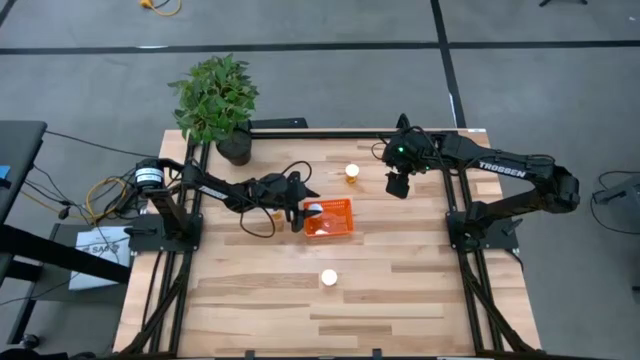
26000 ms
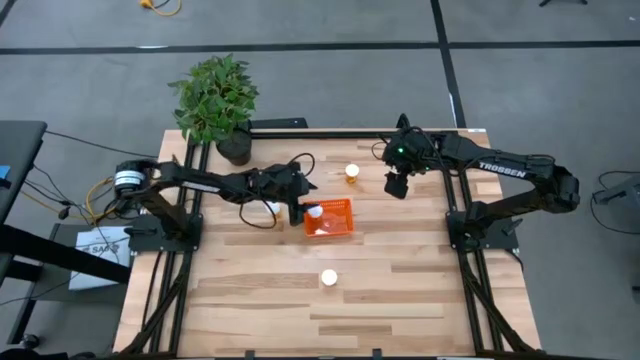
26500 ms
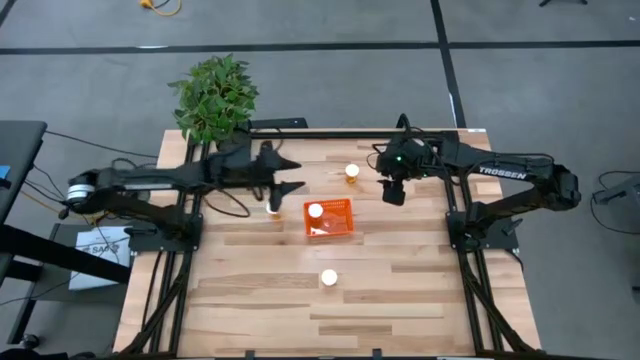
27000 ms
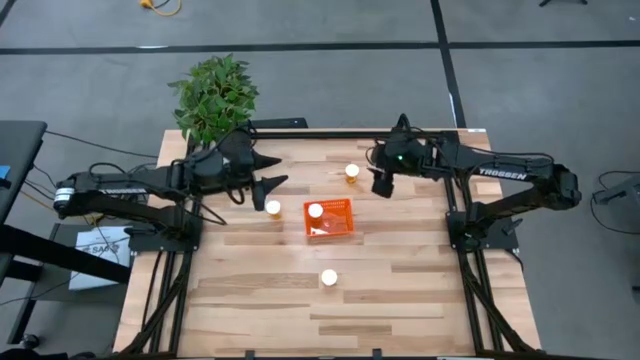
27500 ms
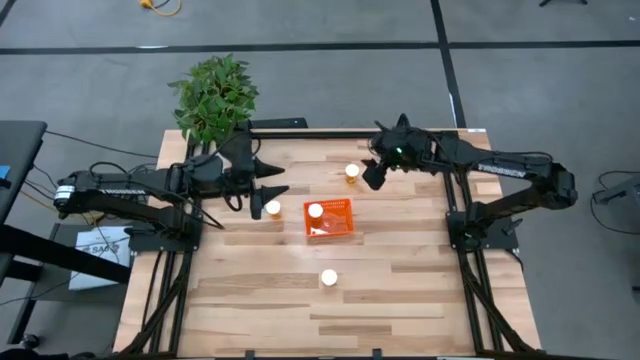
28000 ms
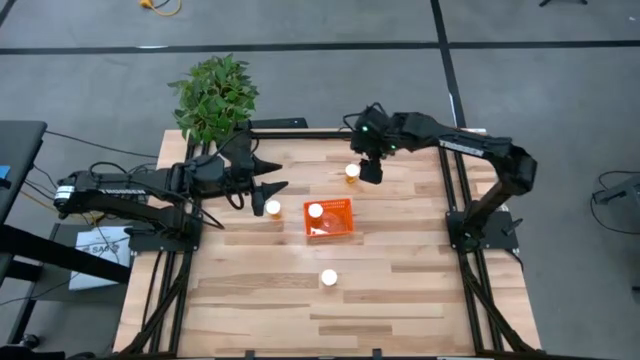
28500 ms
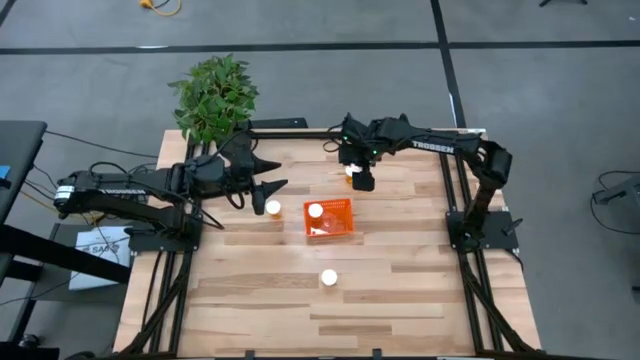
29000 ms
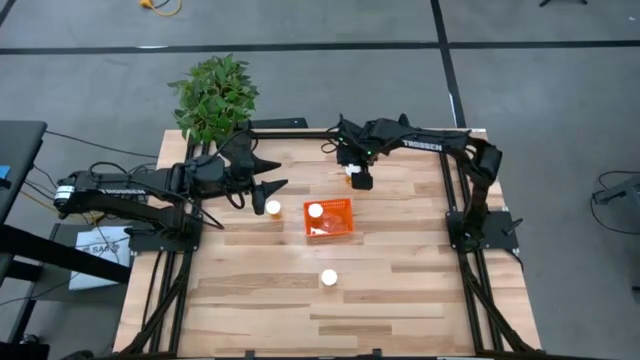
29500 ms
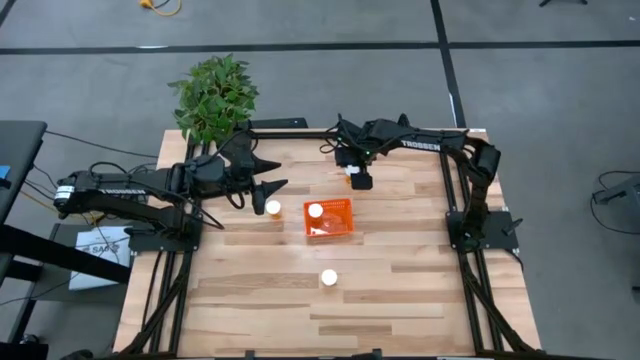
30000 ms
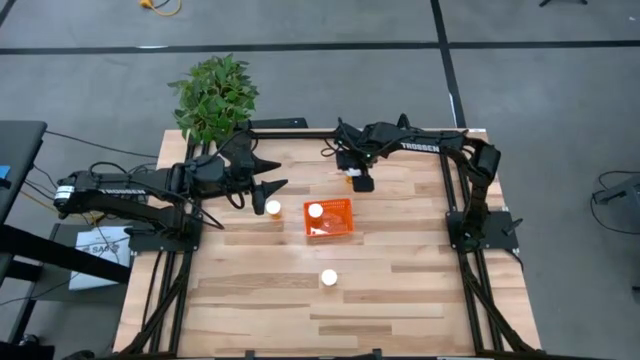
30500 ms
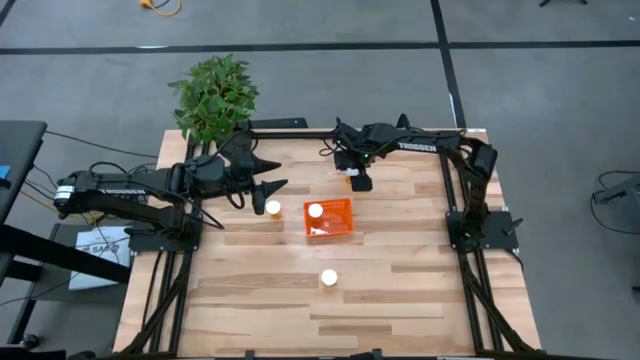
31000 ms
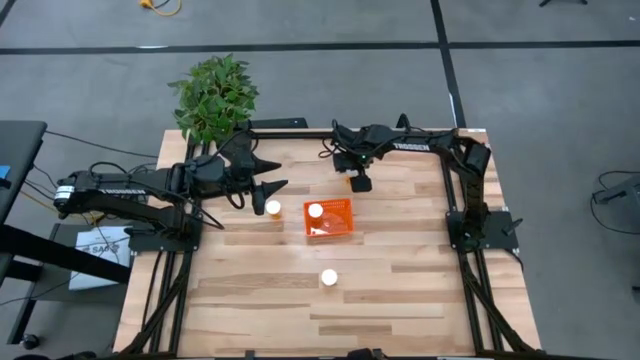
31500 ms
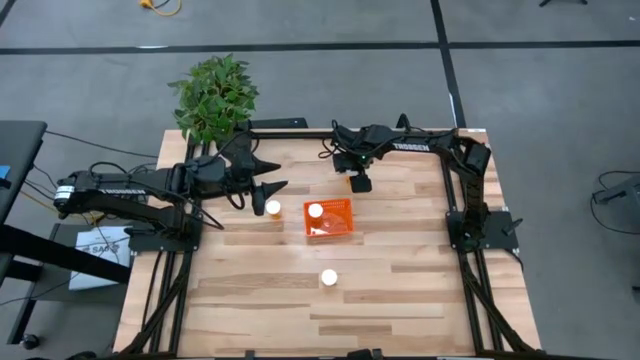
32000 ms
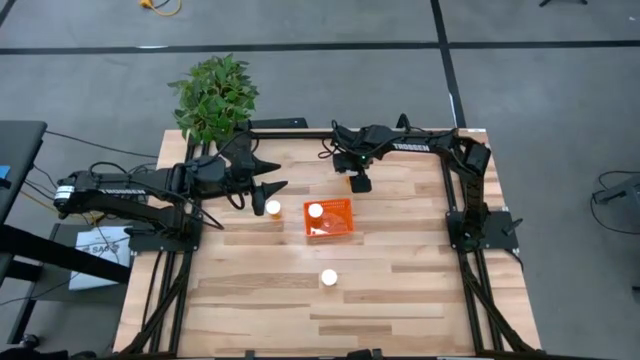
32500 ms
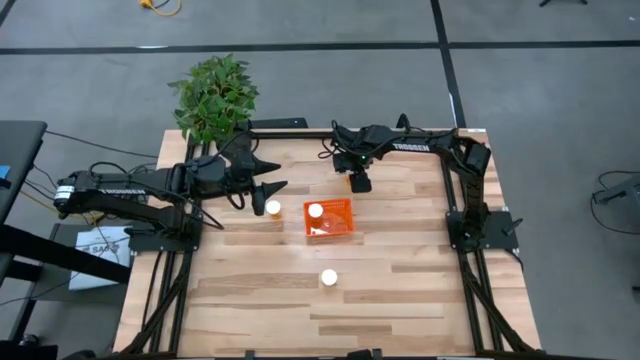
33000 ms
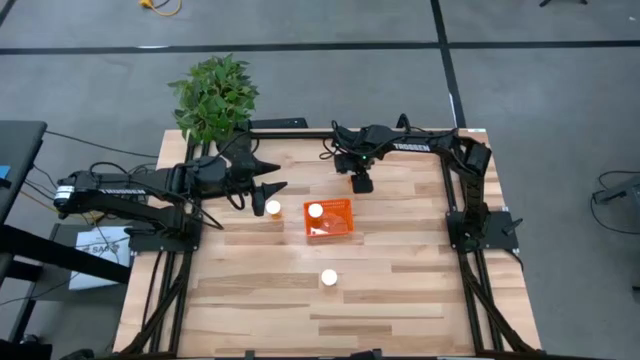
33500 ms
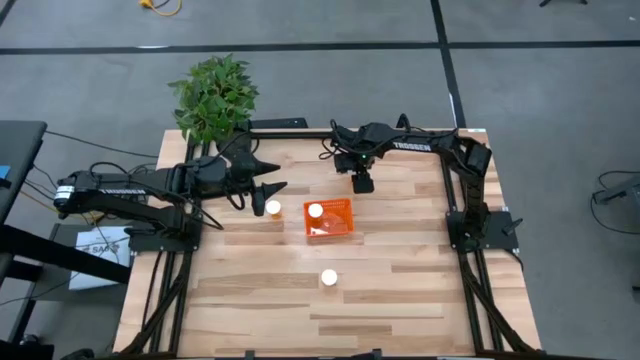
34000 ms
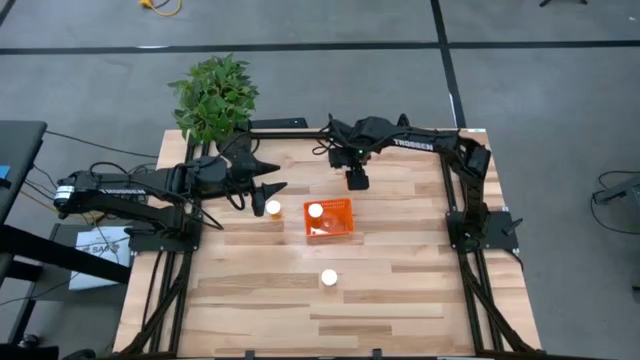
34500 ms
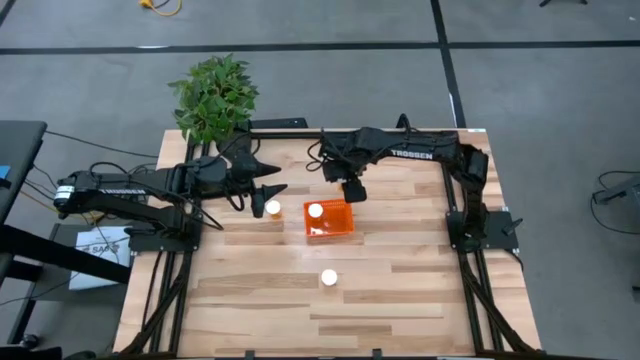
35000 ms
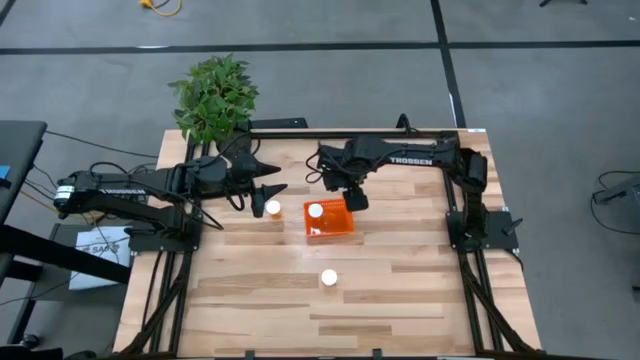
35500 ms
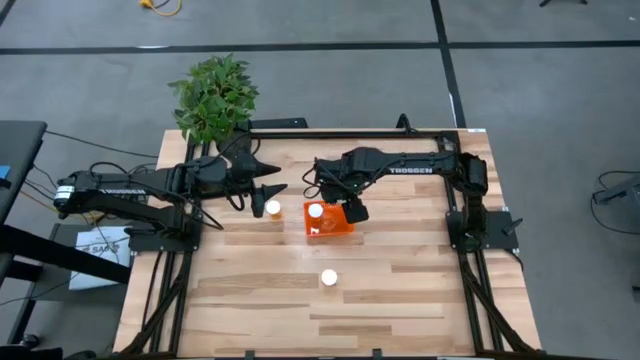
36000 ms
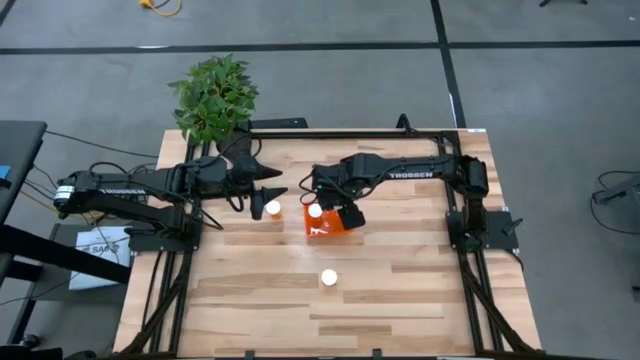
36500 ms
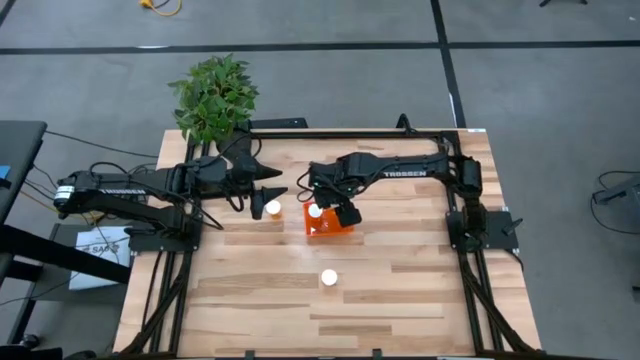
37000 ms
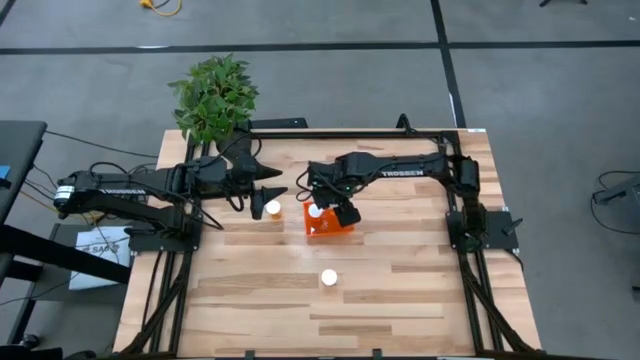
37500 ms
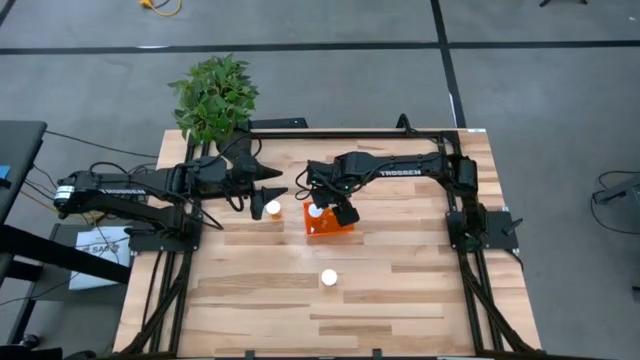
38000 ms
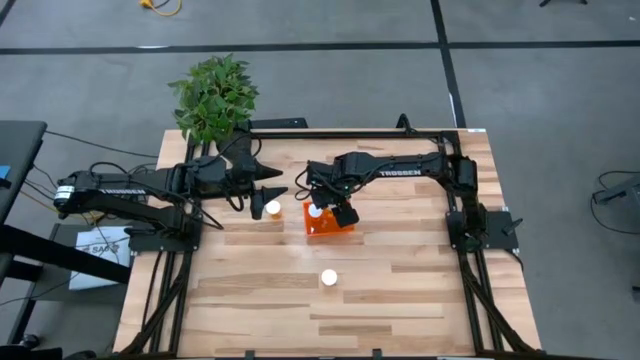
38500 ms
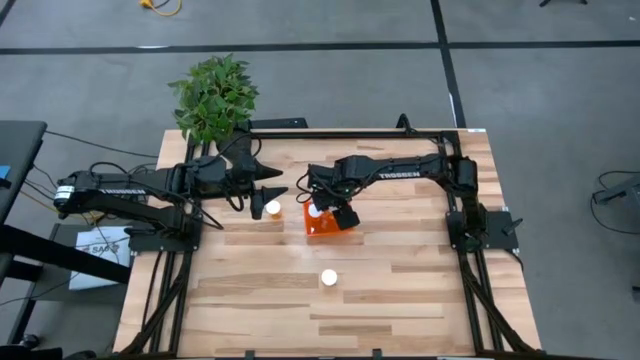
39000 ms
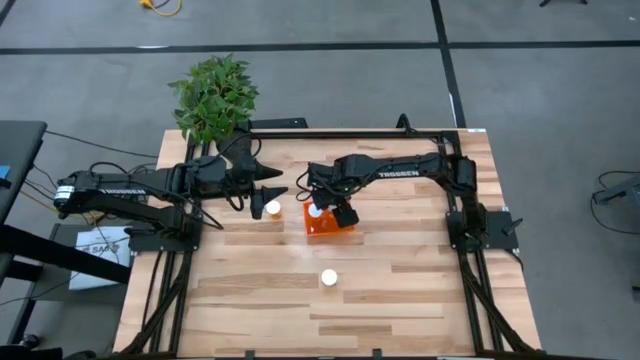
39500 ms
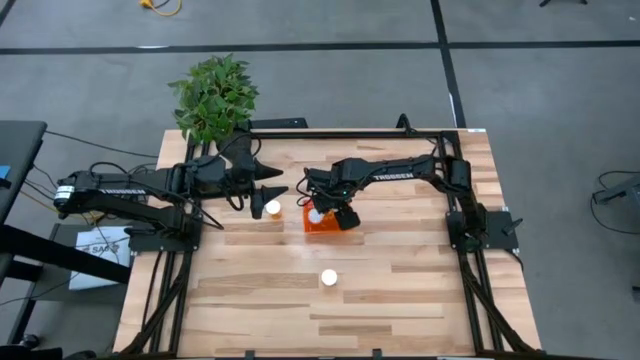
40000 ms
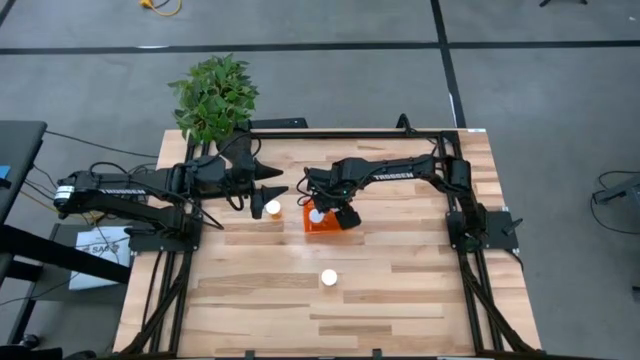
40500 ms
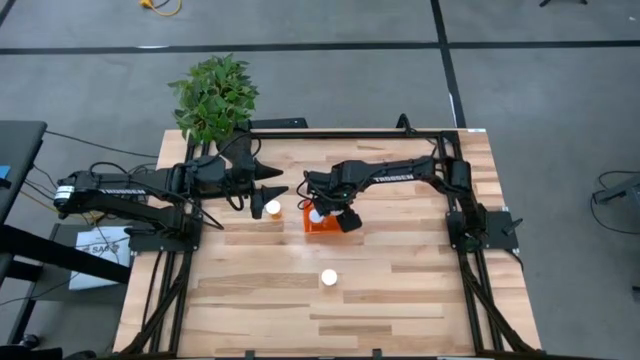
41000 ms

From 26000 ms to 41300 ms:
Task: Pick and place pill bottles into a basket
Put the orange pill bottle into the orange bin

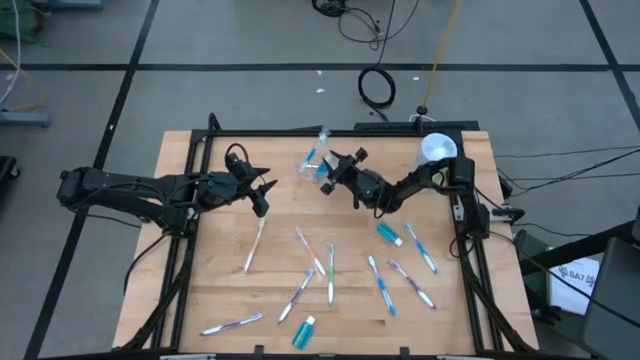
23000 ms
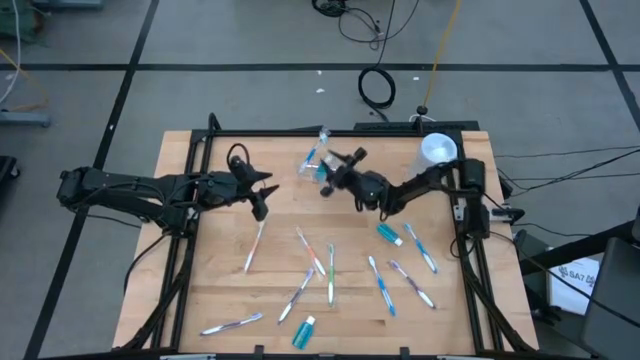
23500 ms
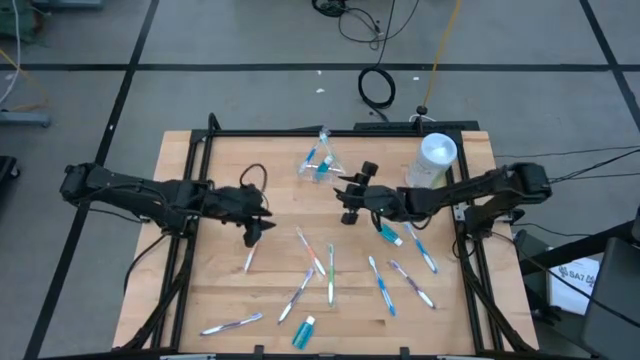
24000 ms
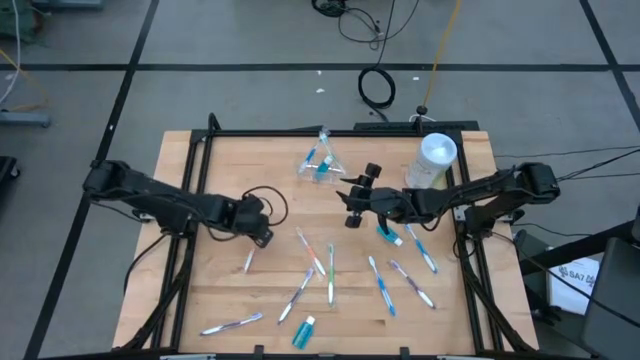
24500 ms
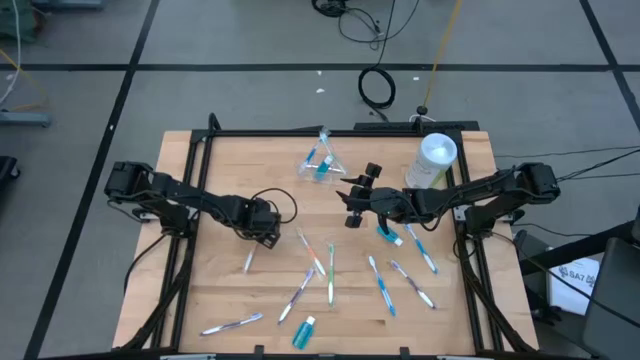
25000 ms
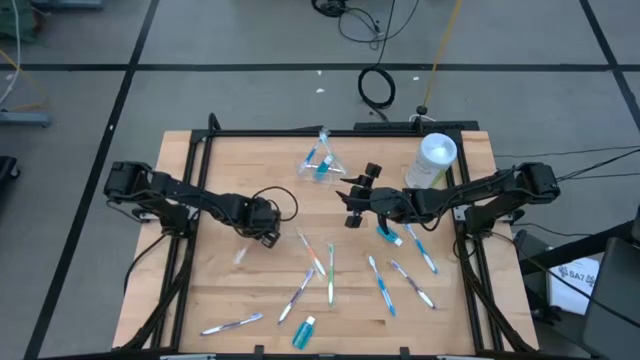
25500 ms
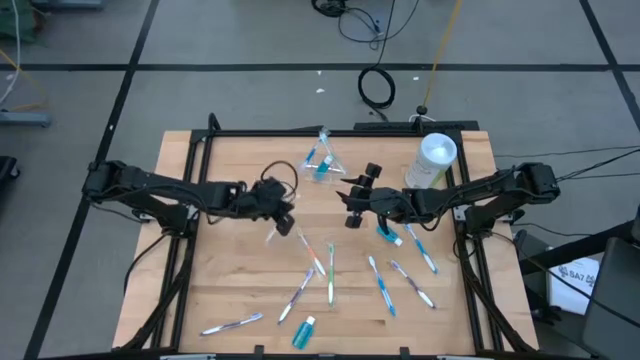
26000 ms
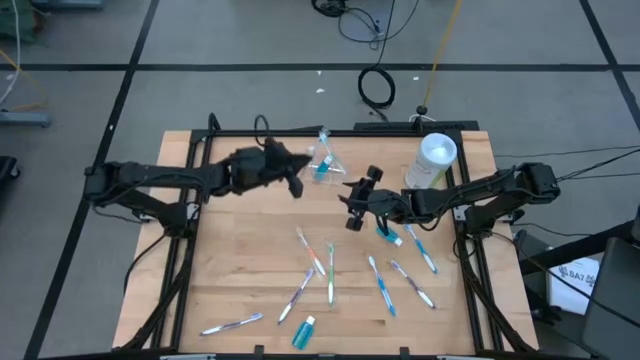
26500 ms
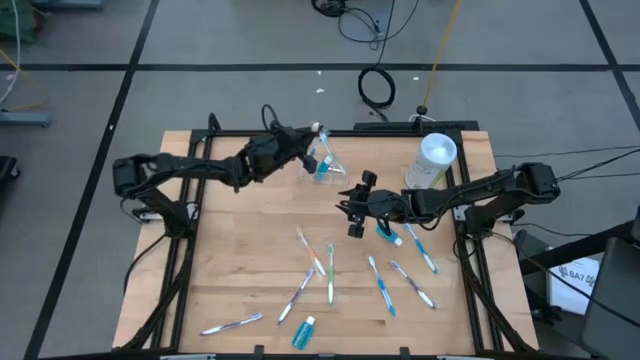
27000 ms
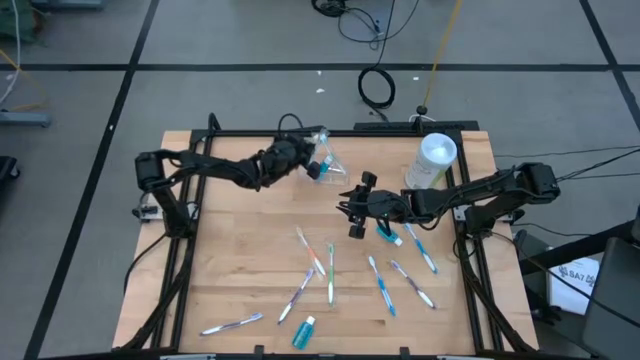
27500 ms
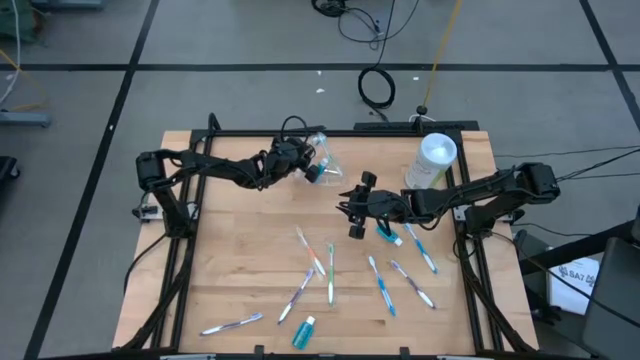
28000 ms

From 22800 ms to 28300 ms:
Task: Pick & Place toothbrushing station
Put the left orange toothbrush into the transparent organizer
